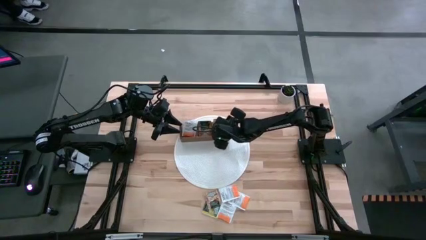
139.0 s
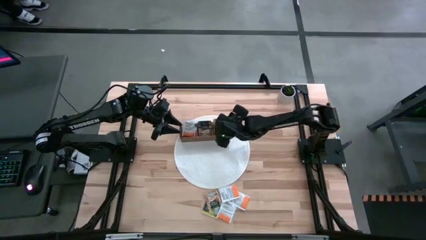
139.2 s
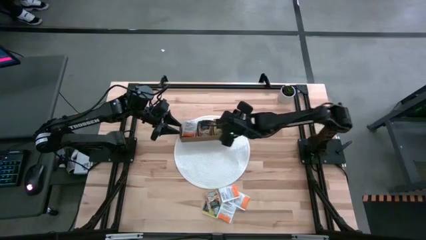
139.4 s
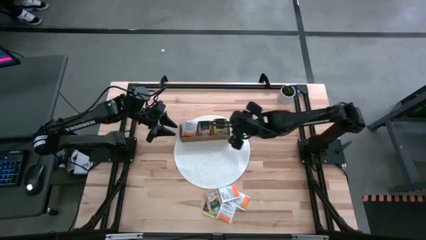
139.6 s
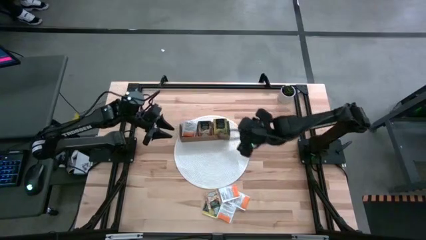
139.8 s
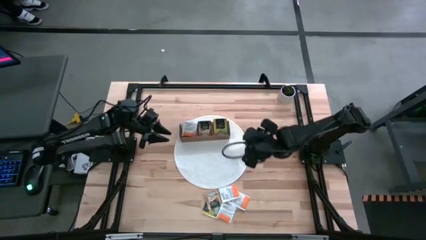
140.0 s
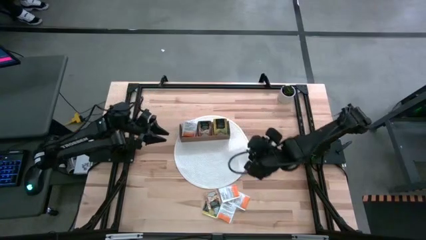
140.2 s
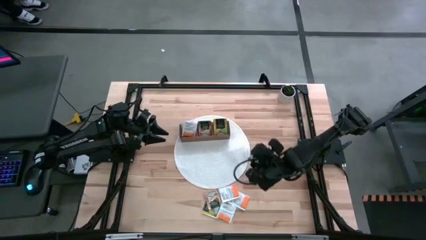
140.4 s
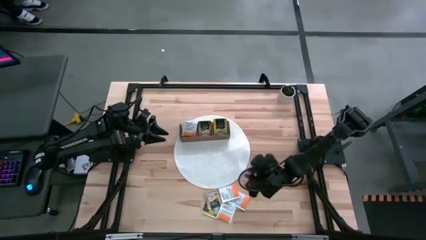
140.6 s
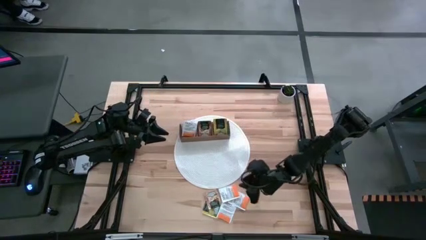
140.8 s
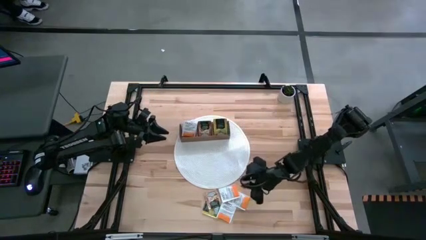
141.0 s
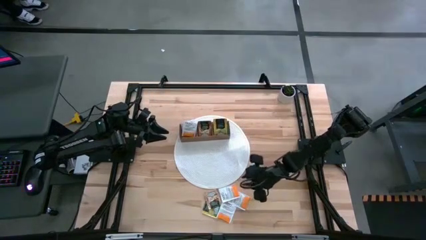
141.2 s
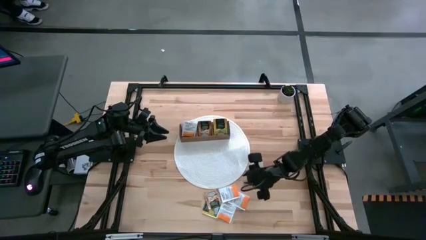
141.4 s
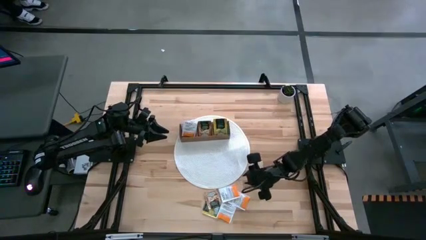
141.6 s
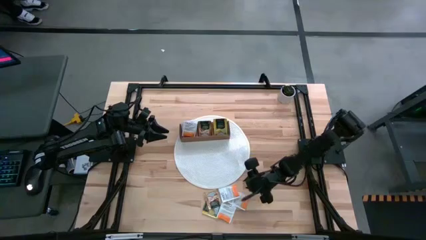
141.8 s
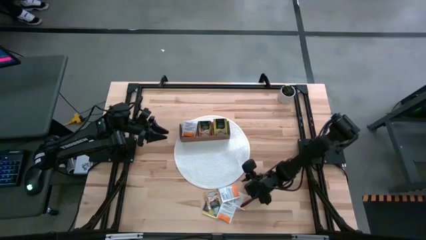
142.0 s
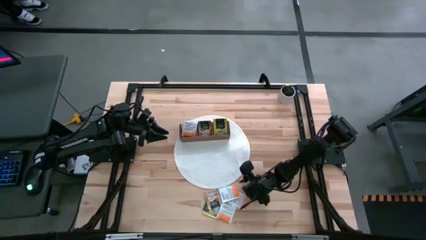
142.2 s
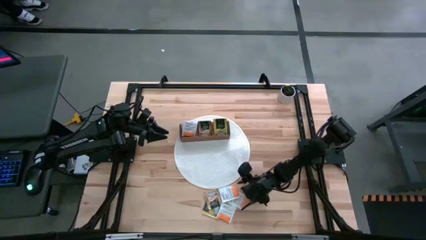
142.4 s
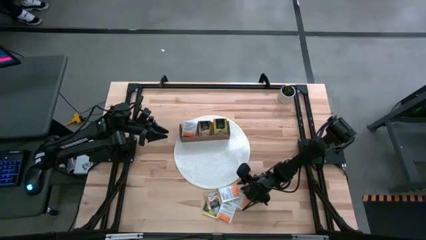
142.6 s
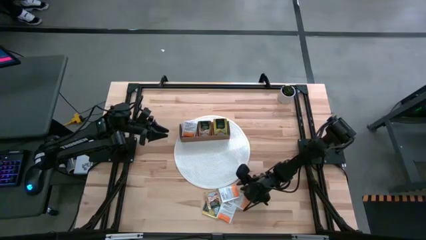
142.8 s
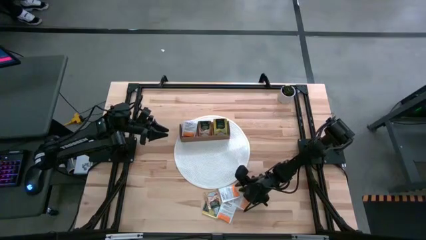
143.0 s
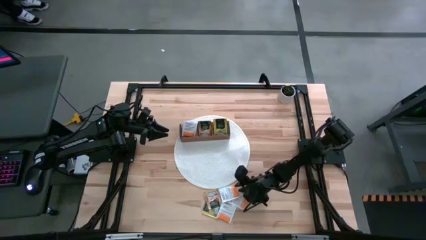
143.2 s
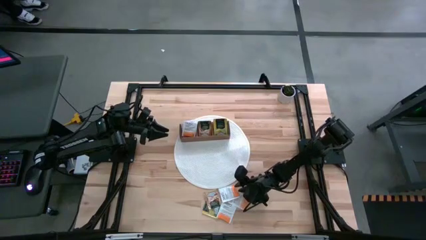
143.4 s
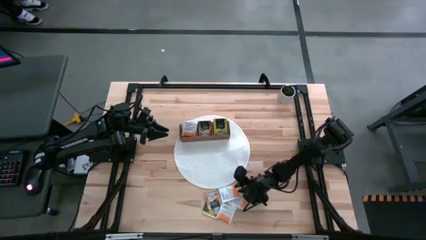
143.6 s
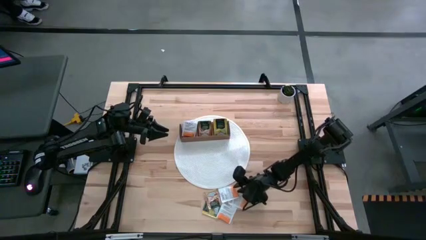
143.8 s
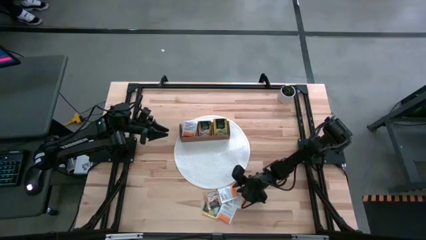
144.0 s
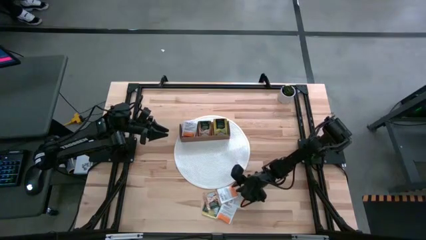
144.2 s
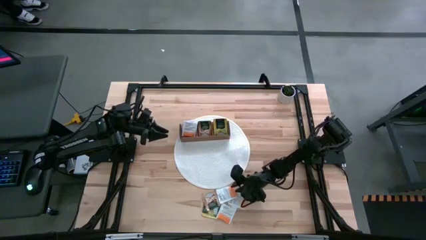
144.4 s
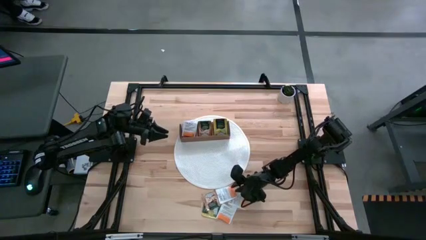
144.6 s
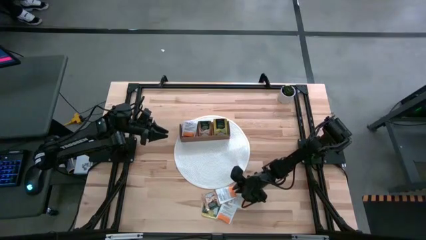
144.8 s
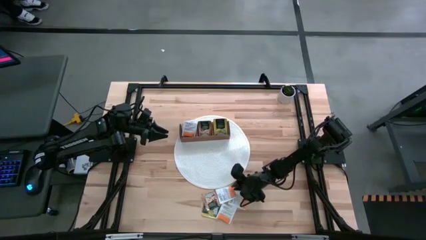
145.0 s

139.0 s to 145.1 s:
Task: Pick & Place Tea
Put the orange tea bag into the left section of the wooden organizer

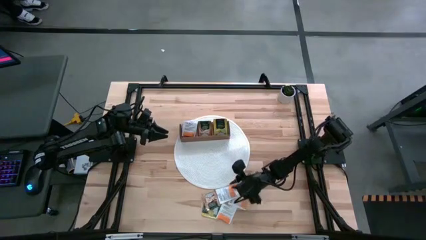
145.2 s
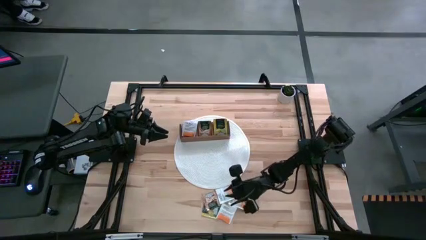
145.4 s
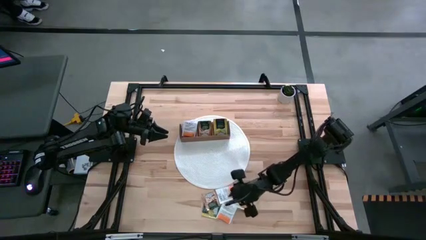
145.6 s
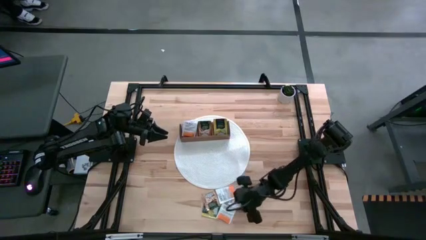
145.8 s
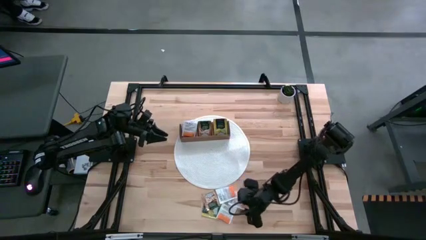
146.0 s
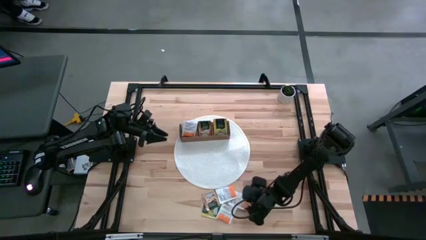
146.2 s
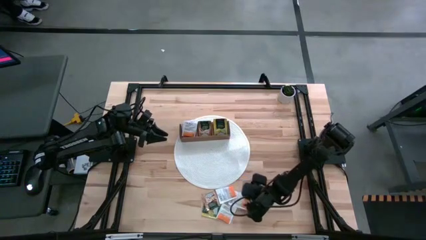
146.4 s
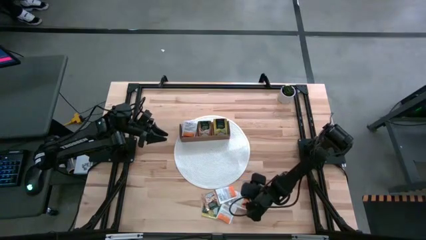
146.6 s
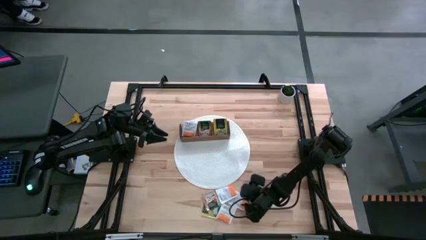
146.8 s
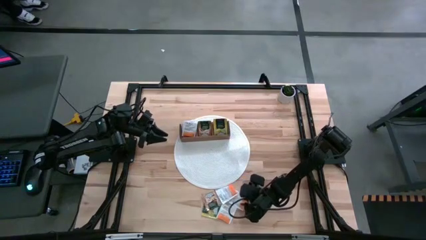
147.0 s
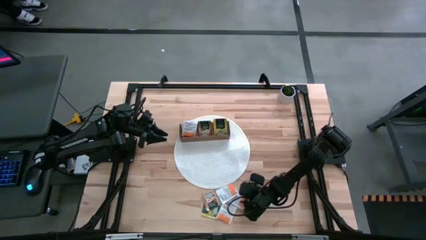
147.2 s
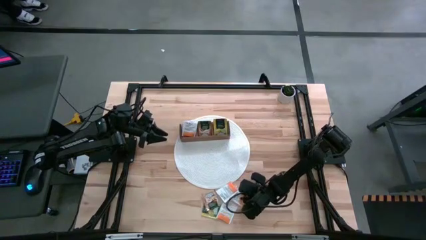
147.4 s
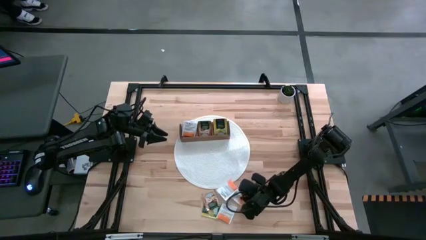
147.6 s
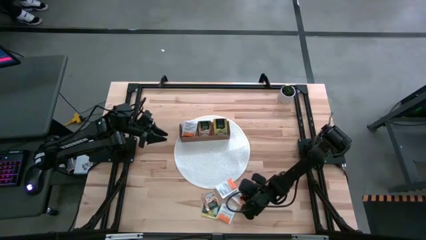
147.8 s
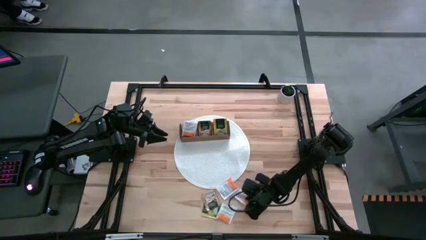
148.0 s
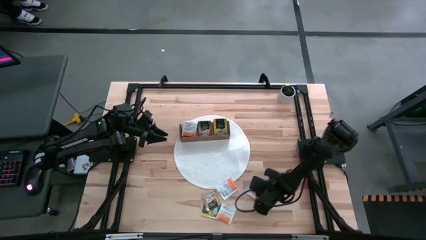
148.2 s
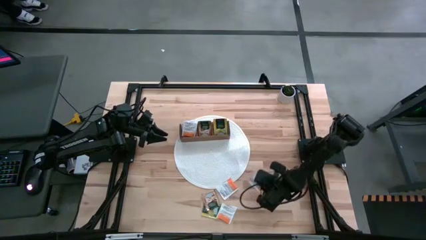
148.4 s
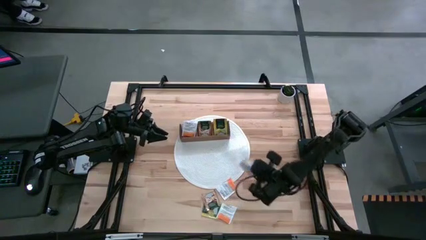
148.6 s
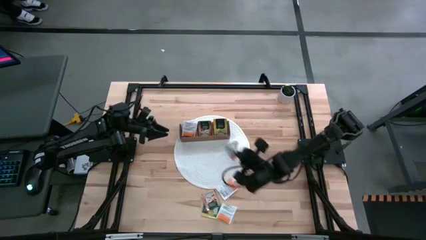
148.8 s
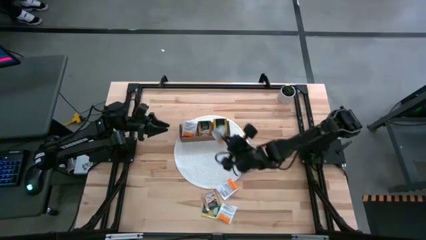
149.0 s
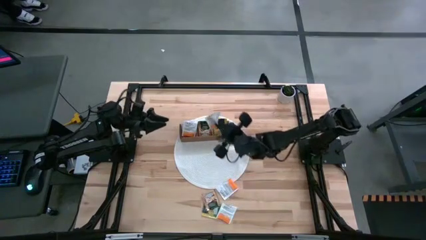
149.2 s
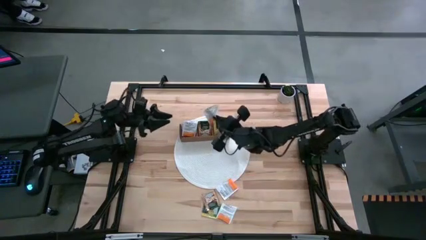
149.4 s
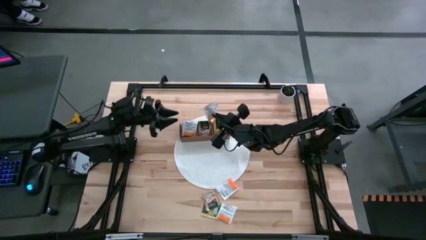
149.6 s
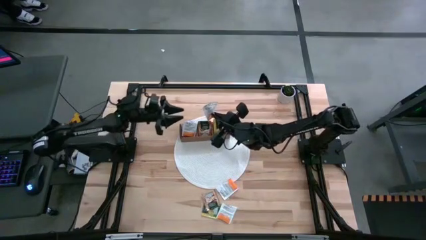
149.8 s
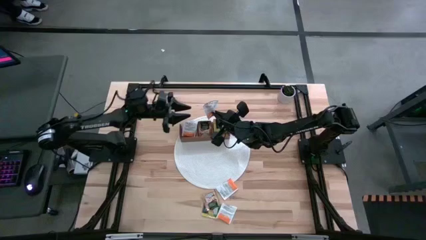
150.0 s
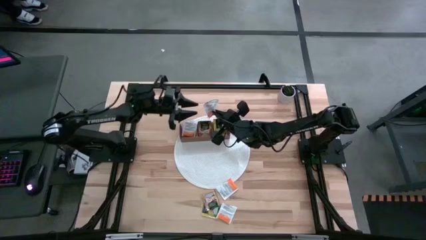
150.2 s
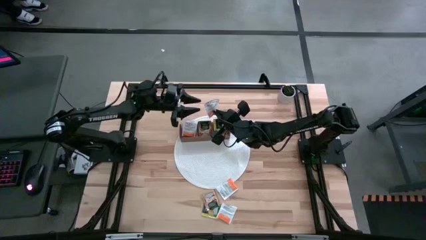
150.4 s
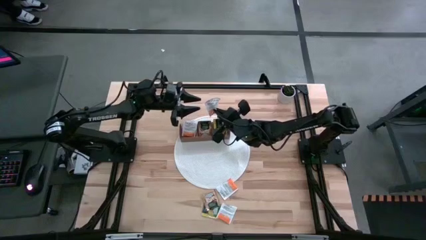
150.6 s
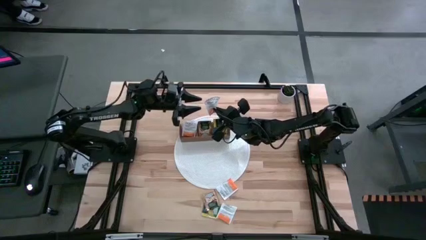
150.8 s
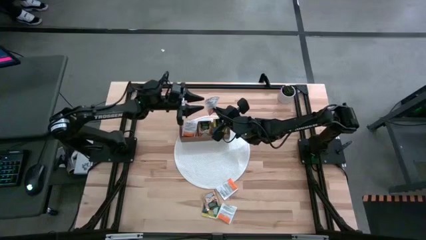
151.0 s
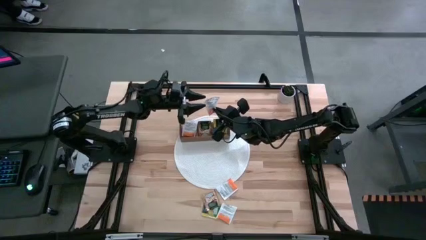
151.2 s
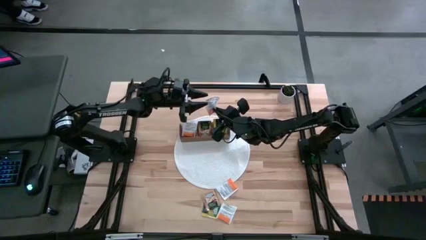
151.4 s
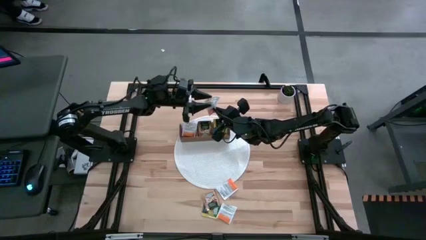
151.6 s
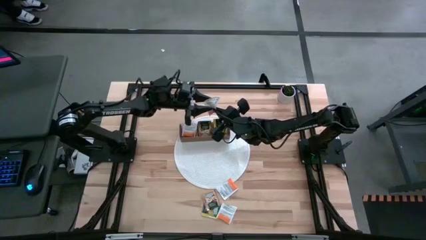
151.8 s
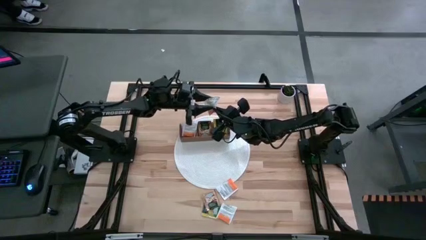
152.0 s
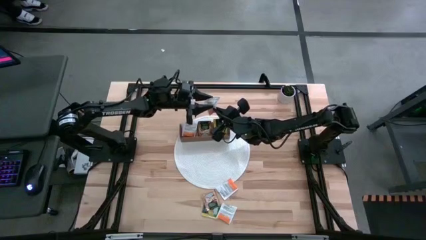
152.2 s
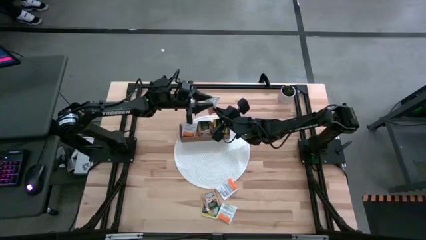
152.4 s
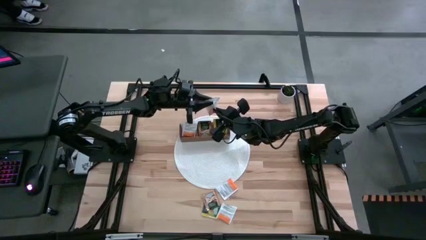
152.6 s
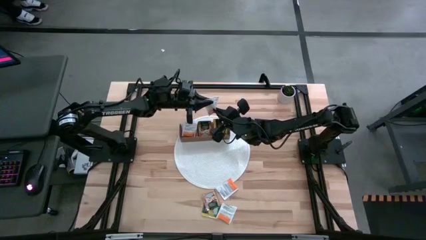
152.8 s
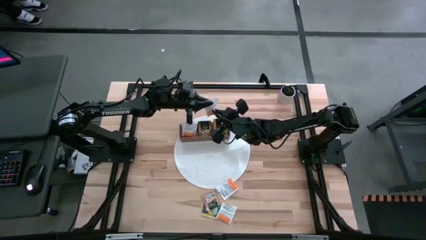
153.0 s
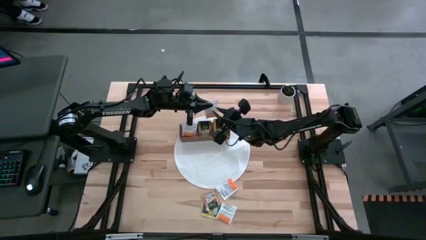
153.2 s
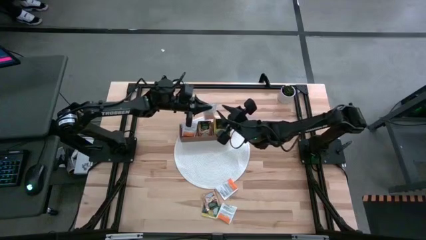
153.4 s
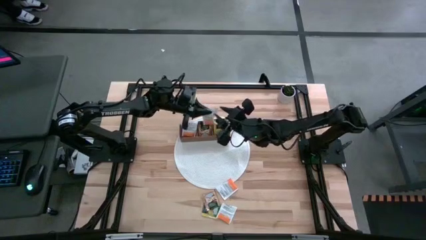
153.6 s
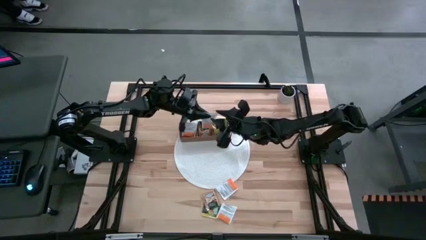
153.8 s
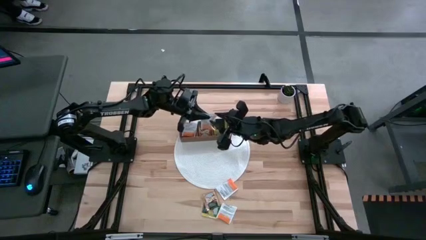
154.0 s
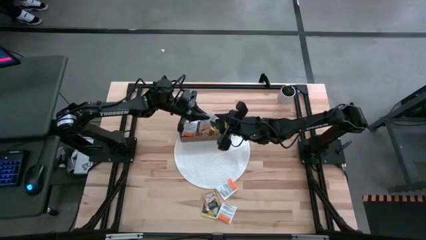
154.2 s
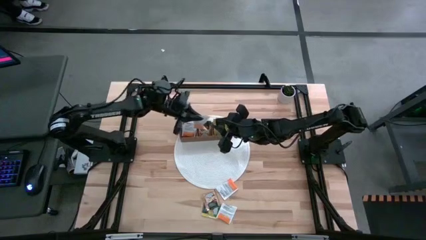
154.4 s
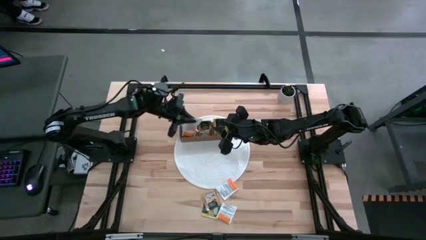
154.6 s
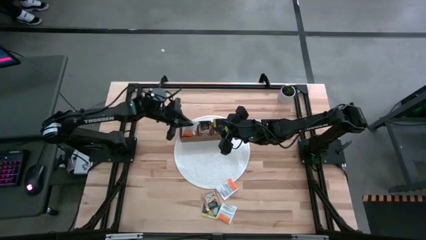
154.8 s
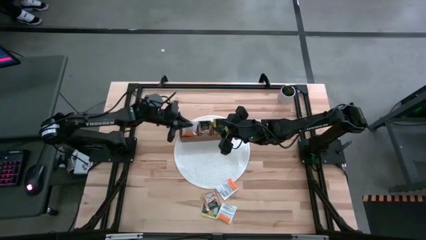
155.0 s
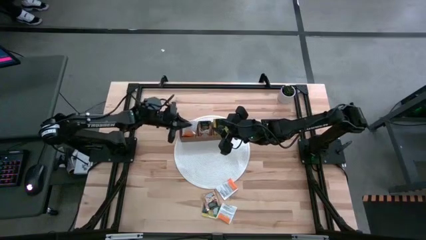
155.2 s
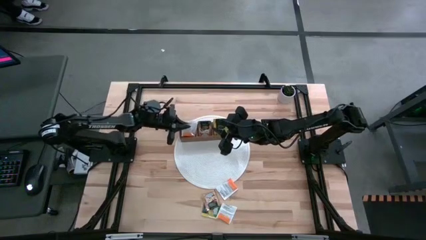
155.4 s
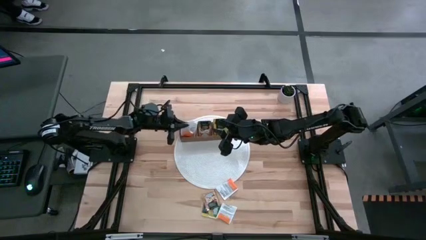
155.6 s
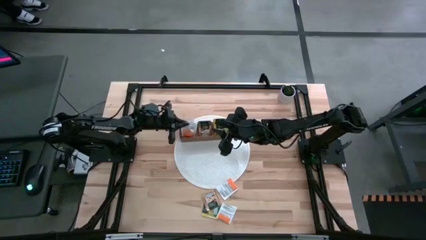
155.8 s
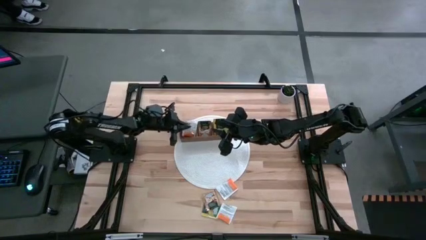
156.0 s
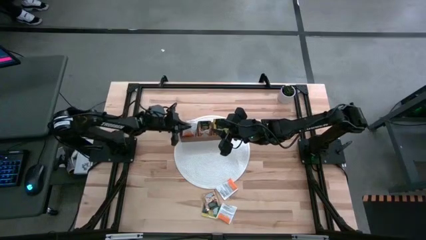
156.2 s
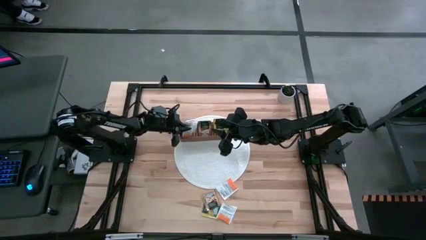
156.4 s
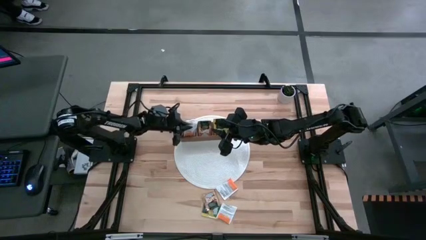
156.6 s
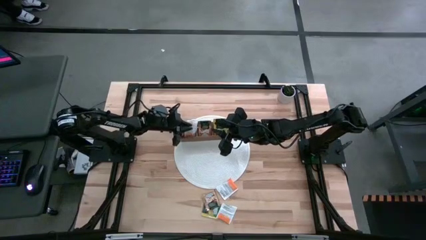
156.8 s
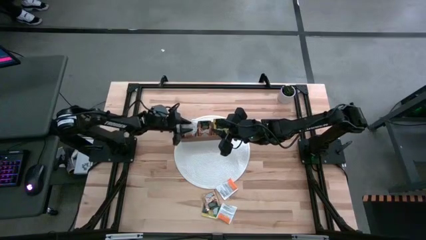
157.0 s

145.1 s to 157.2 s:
Put the orange tea bag into the left section of the wooden organizer
